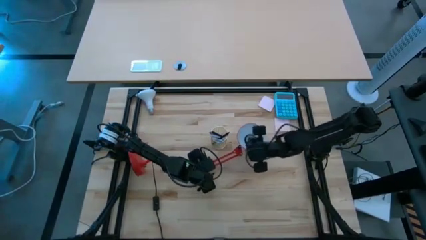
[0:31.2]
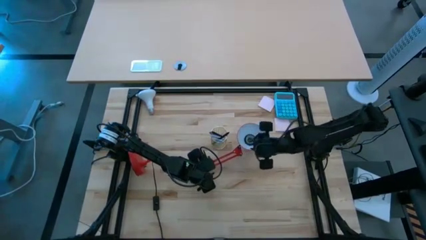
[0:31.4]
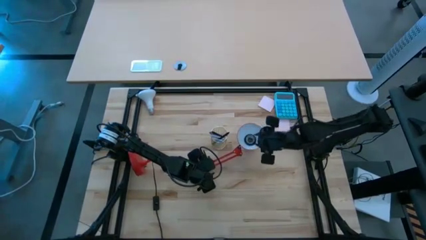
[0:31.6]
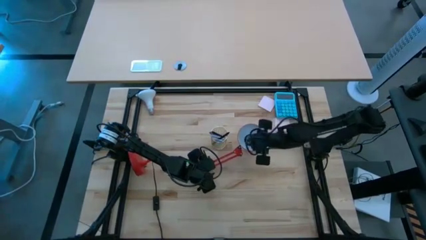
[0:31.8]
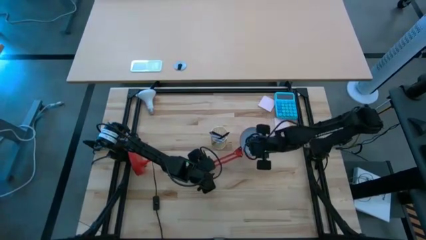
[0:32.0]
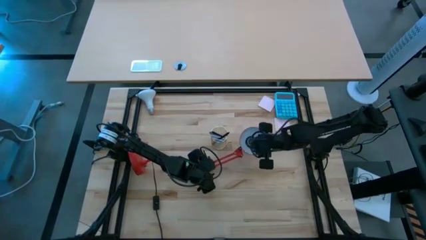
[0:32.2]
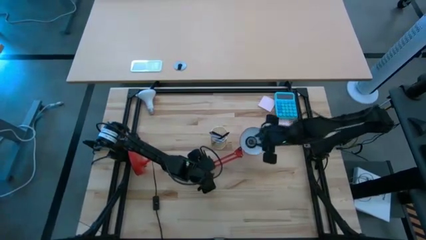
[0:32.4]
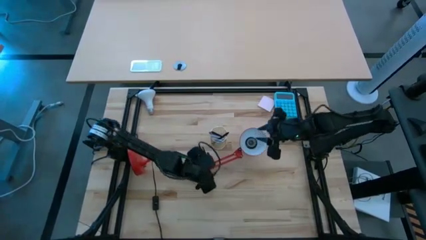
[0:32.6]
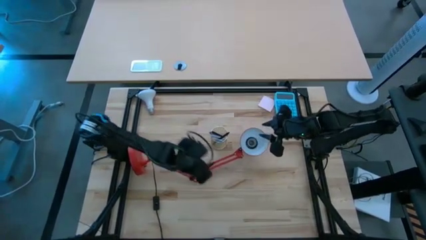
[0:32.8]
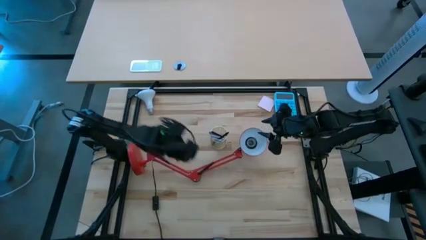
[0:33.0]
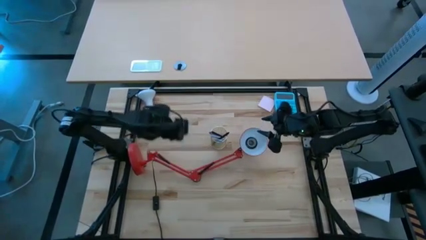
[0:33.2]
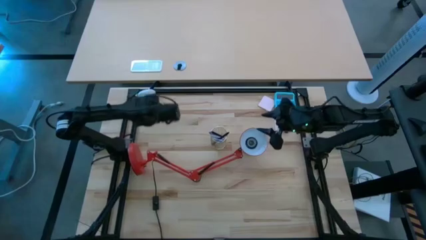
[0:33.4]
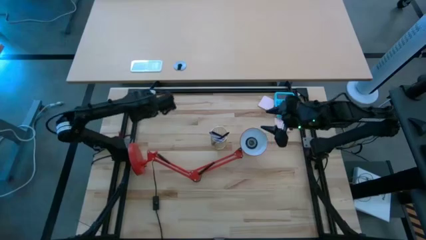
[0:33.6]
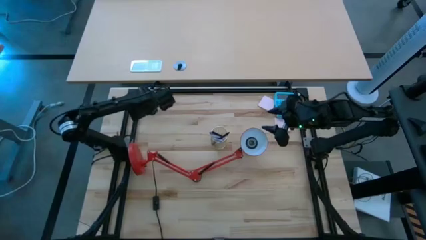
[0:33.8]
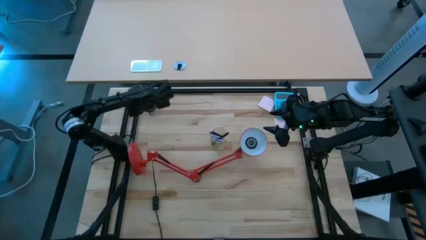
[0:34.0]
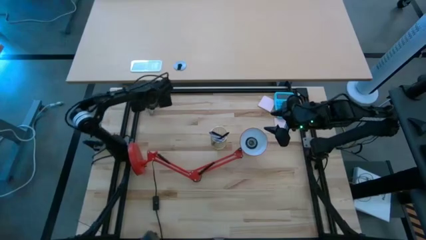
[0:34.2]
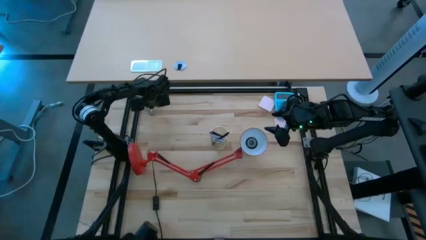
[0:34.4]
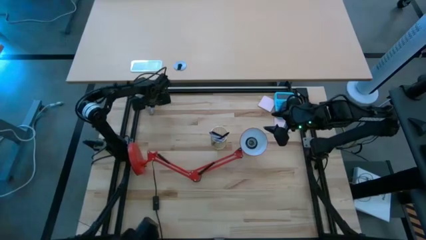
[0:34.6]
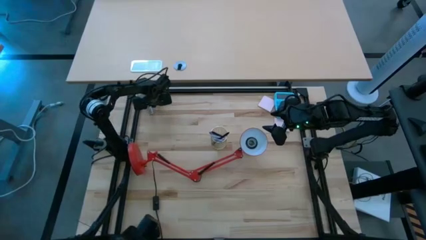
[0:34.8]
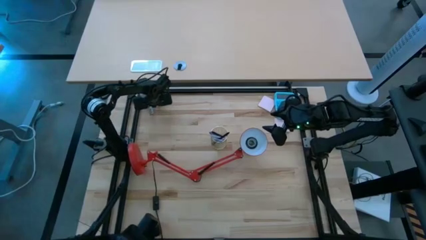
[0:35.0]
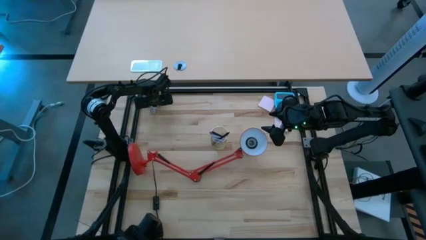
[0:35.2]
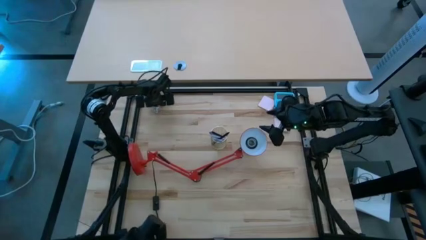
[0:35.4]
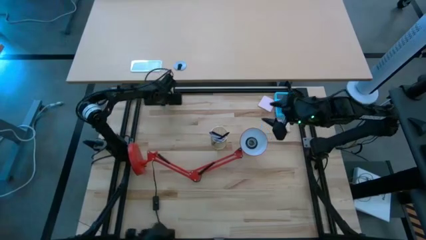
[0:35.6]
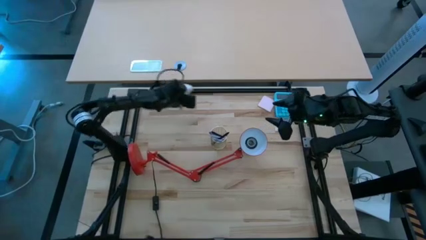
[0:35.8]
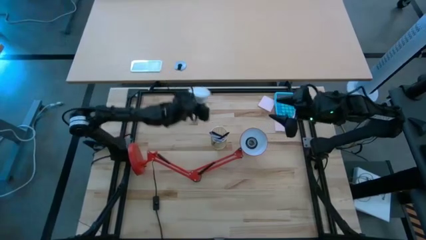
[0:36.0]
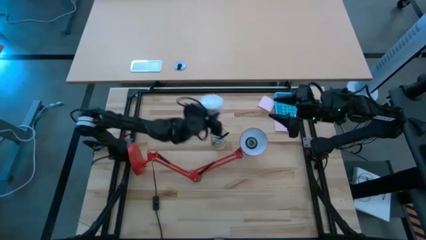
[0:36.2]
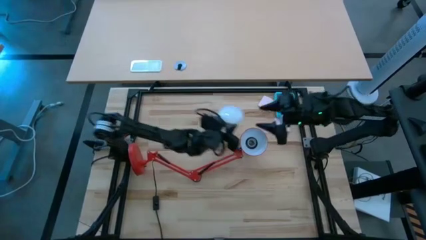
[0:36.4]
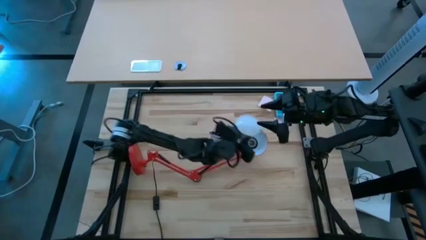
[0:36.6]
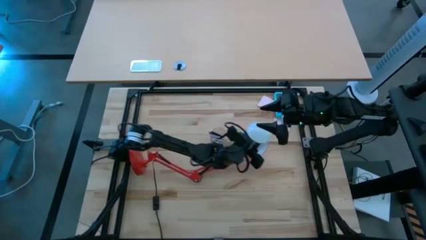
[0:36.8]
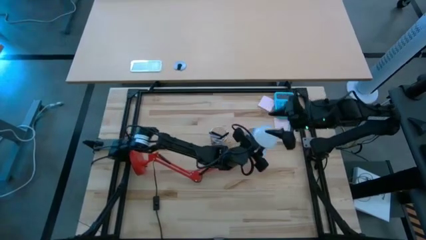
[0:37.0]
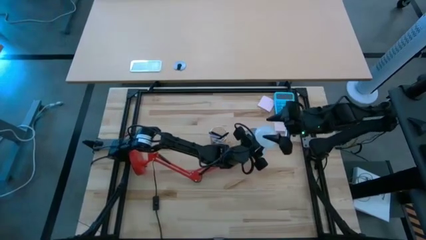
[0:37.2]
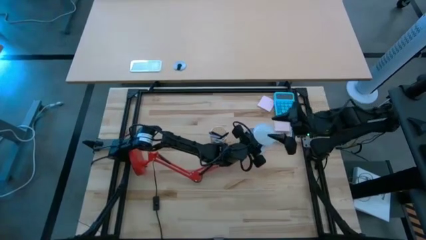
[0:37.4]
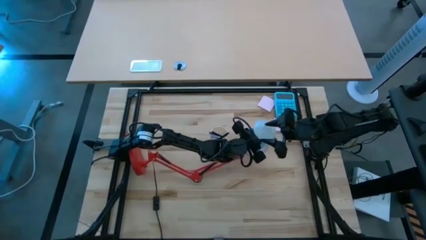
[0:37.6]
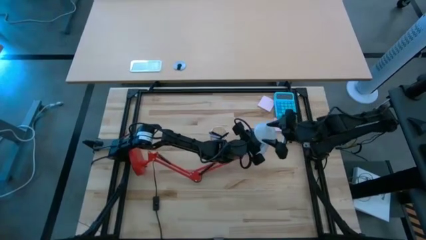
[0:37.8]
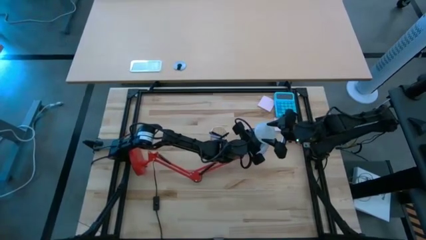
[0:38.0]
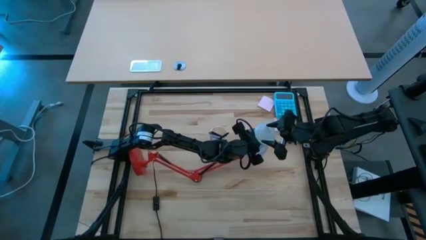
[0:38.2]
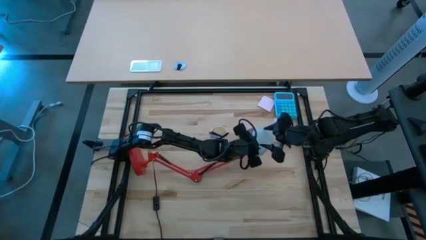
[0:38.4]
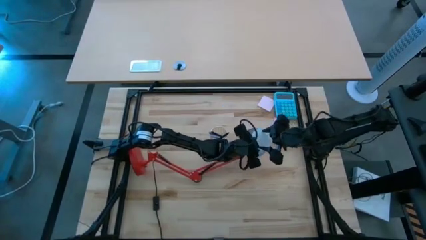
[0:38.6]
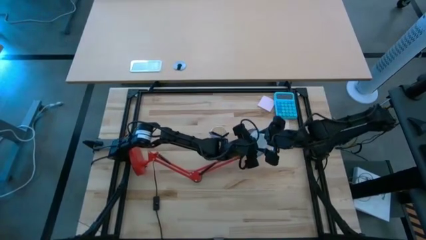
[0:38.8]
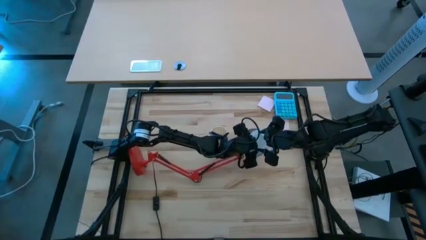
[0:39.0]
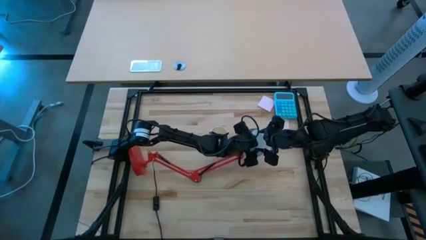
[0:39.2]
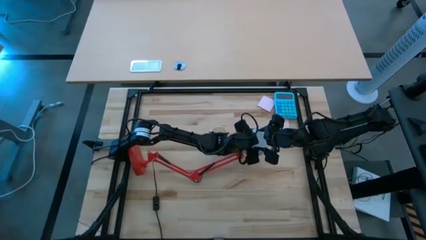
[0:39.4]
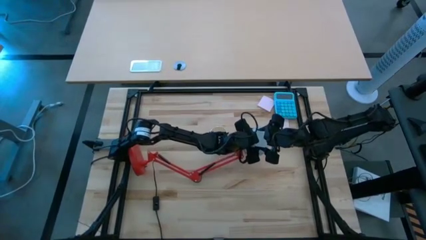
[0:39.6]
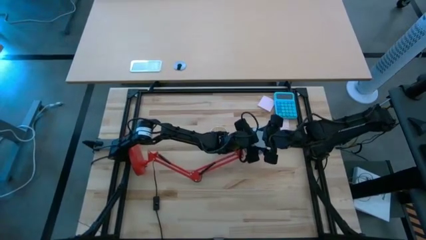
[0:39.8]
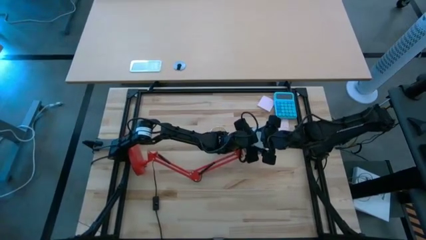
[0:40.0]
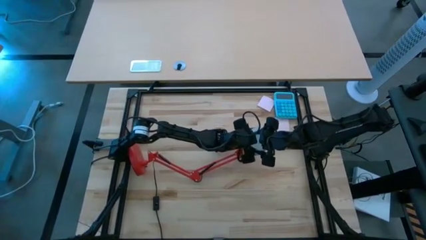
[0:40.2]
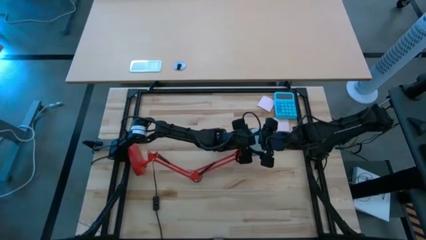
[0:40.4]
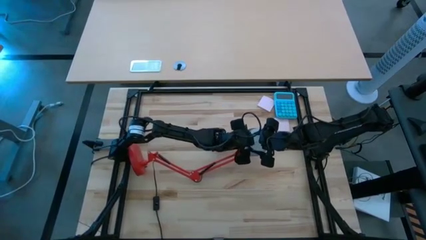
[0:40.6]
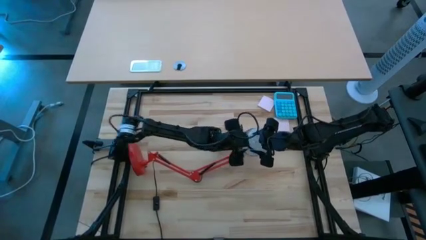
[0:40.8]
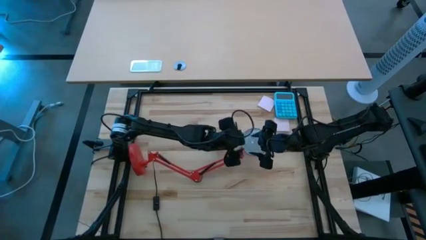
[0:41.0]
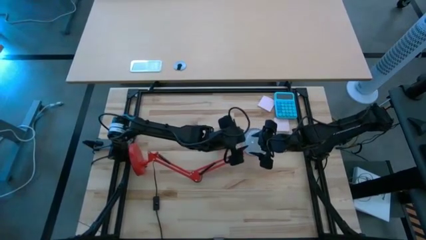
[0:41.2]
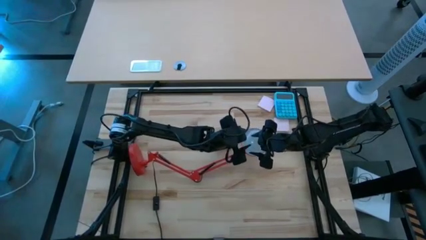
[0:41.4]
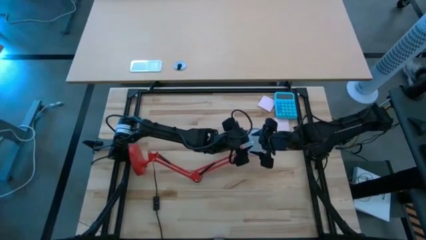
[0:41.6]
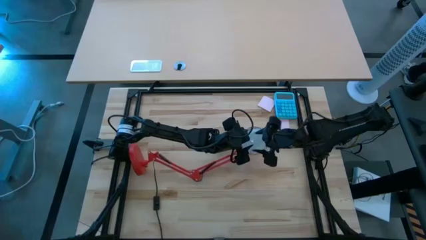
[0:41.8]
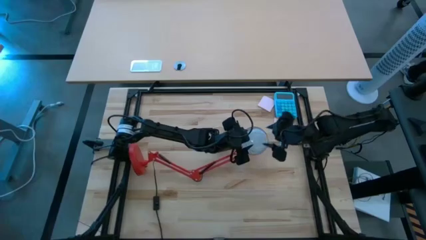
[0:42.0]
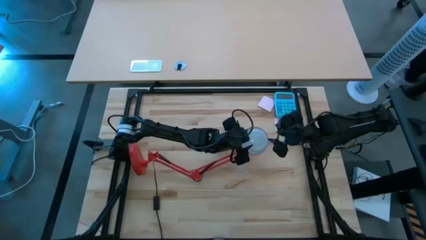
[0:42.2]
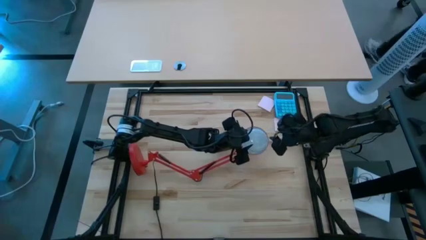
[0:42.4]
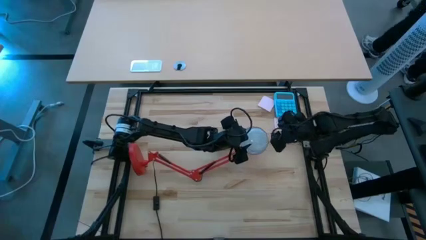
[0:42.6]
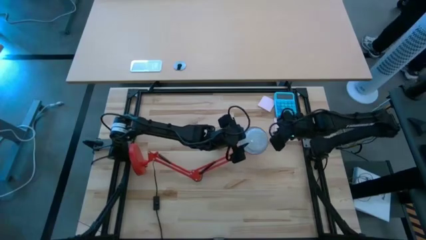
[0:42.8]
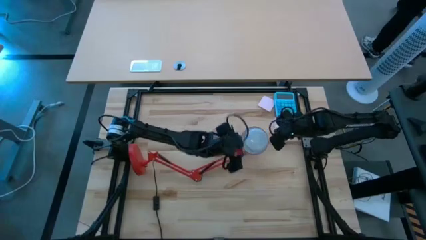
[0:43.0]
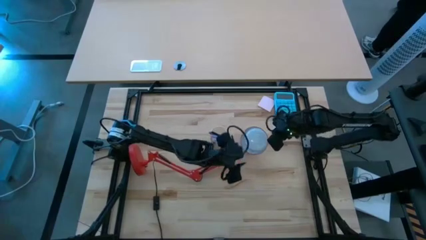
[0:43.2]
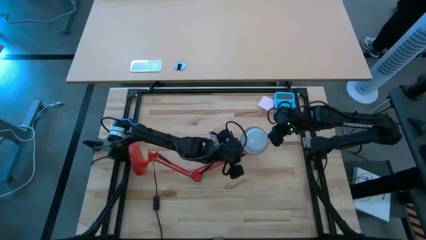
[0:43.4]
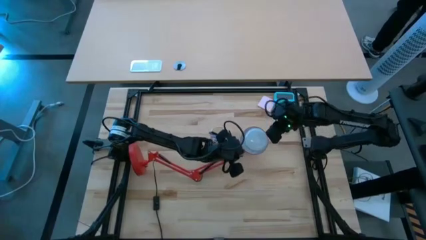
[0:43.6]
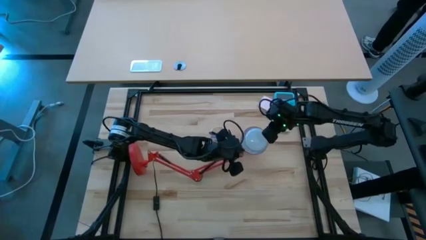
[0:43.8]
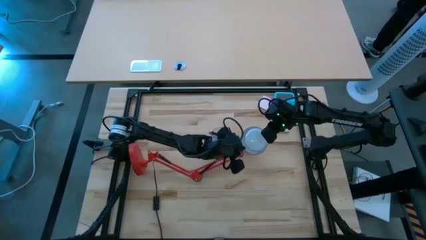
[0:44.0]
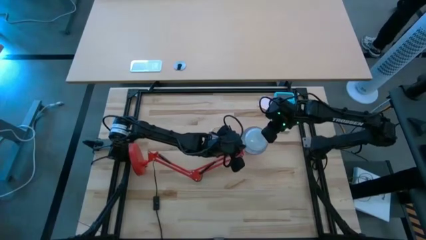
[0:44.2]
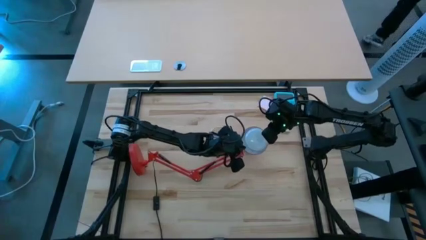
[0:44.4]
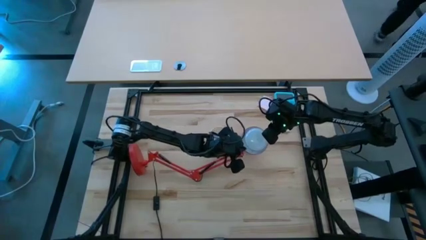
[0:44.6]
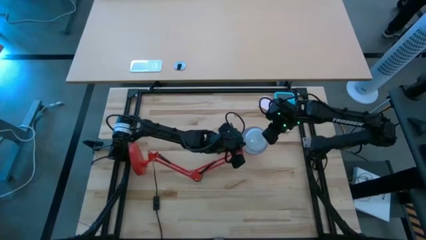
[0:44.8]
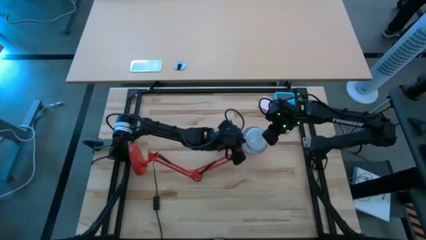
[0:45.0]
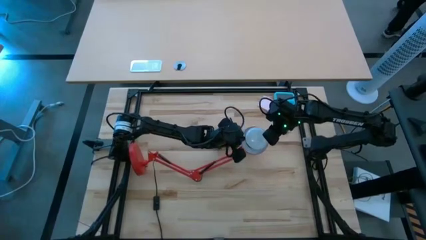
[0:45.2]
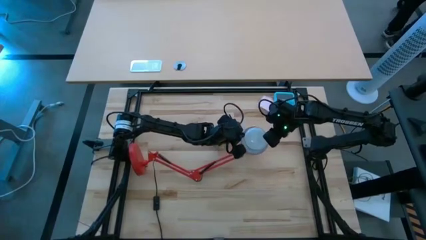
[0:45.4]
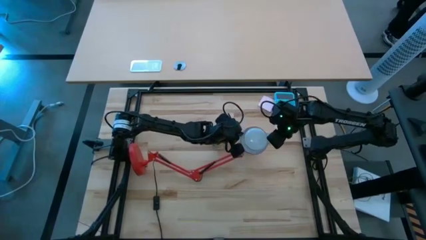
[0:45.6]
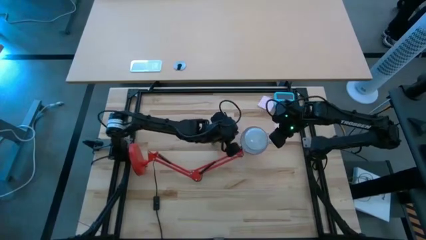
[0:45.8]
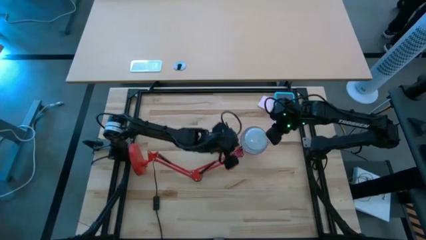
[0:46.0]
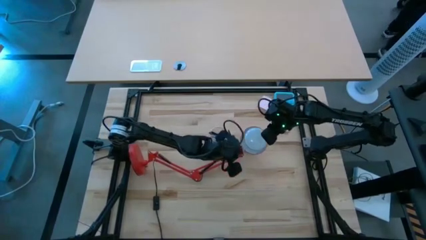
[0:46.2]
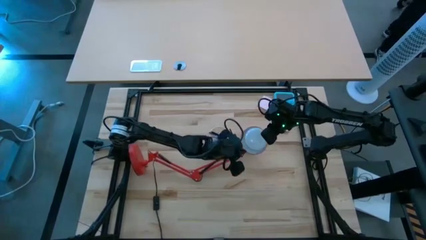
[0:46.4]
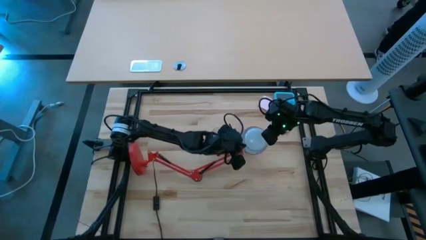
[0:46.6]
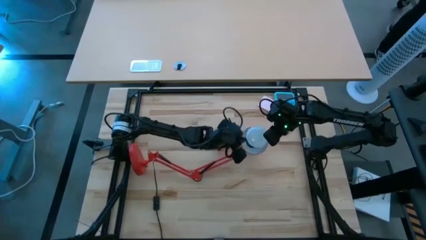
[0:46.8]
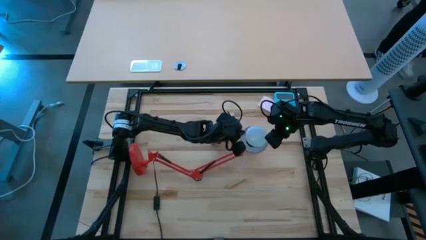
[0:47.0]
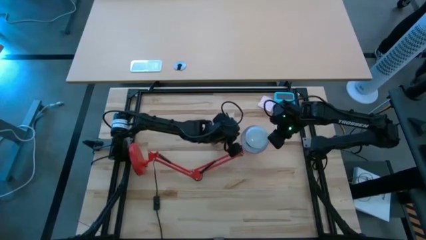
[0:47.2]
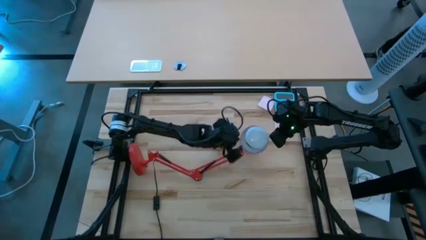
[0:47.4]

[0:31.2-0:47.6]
Task: Screw lightbulb
Insert the light bulb into the lamp
